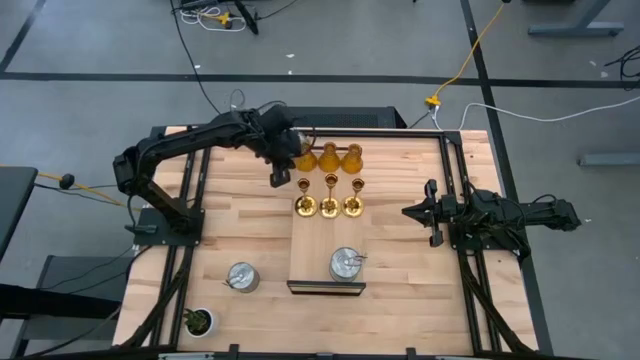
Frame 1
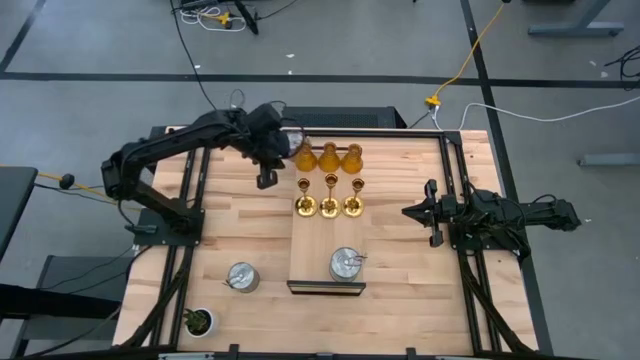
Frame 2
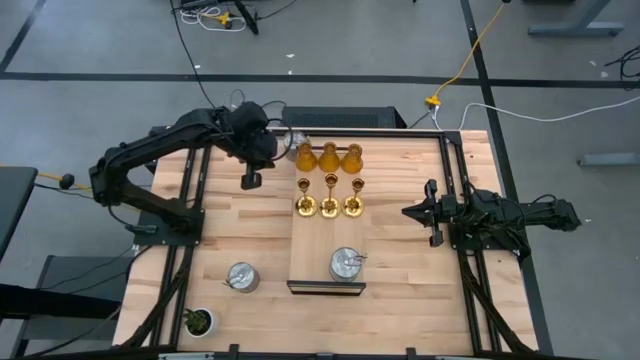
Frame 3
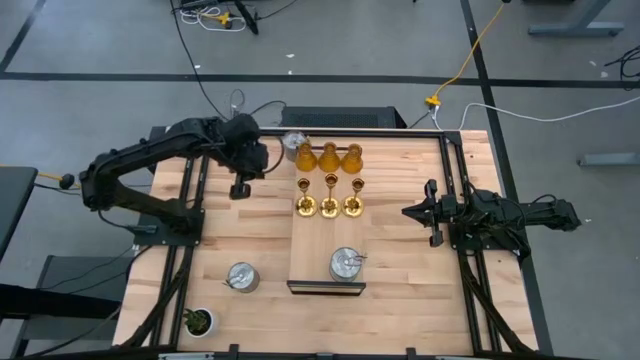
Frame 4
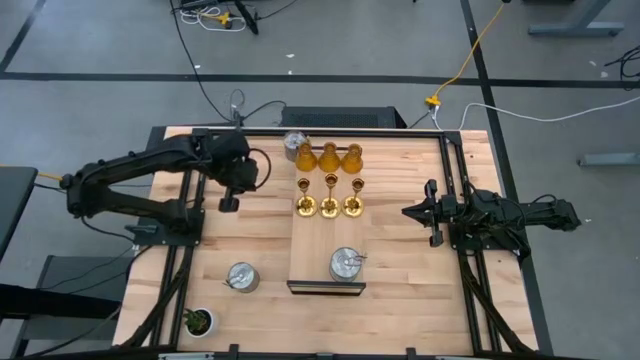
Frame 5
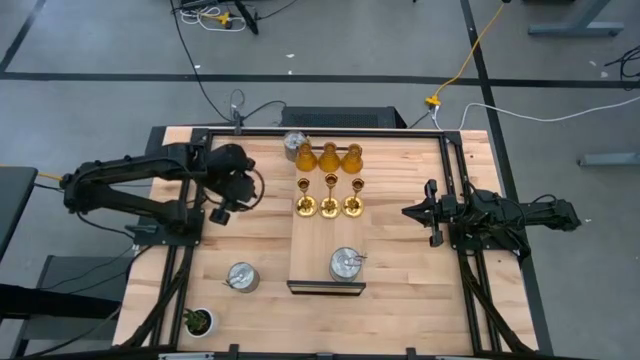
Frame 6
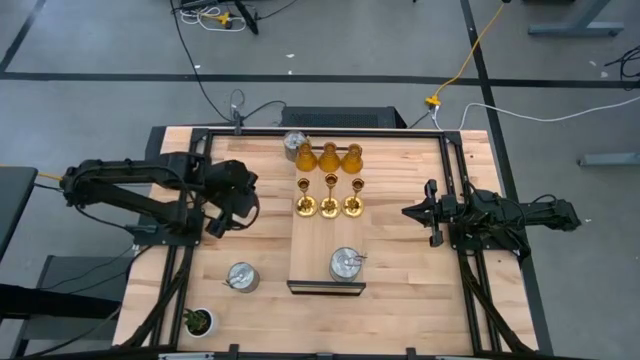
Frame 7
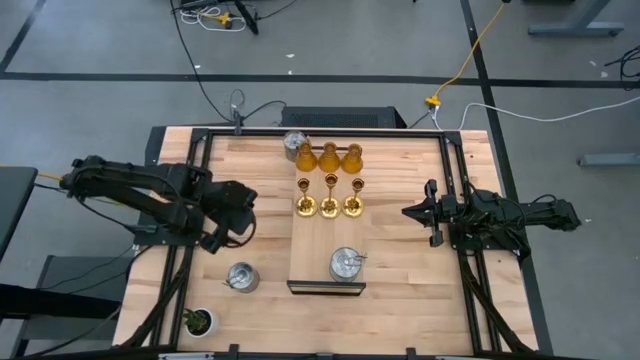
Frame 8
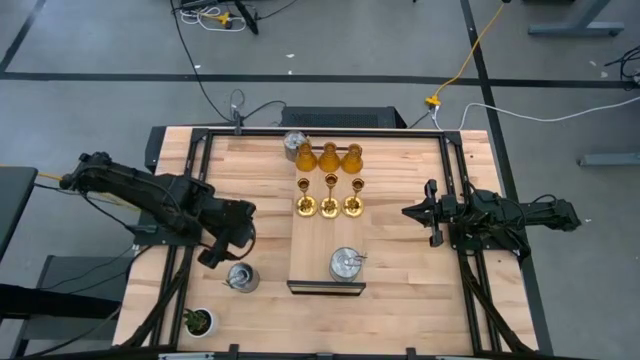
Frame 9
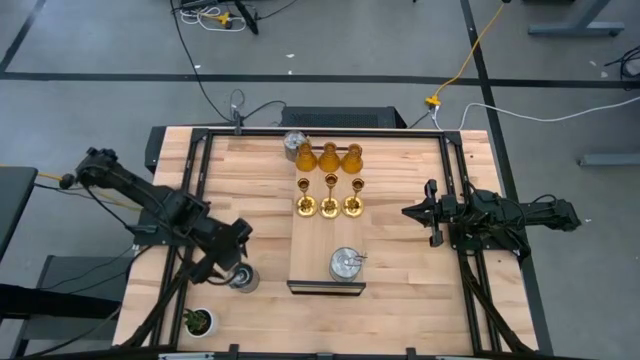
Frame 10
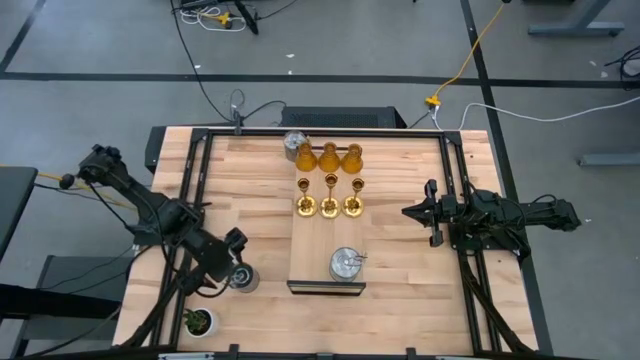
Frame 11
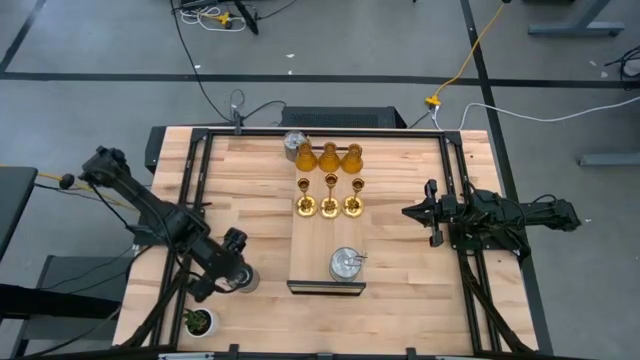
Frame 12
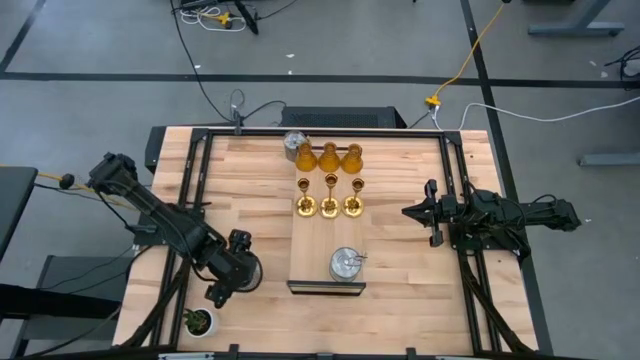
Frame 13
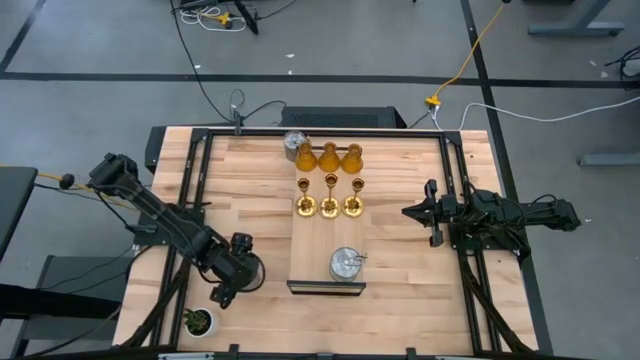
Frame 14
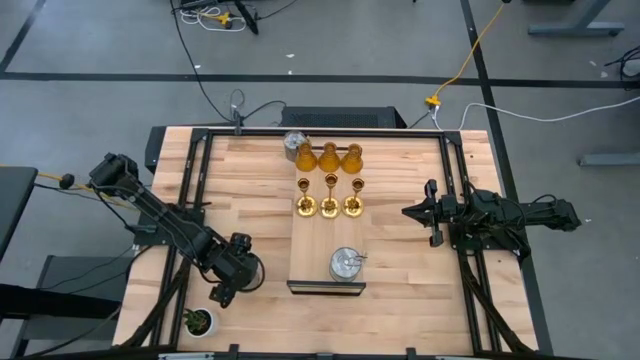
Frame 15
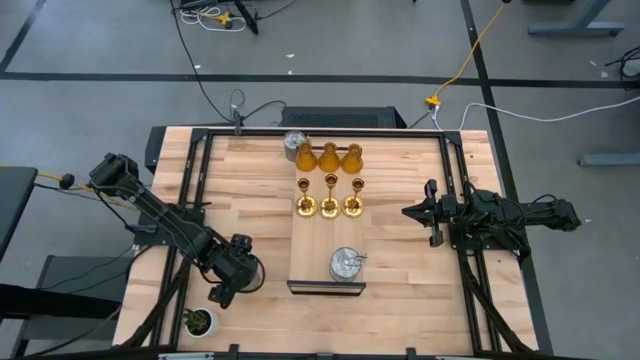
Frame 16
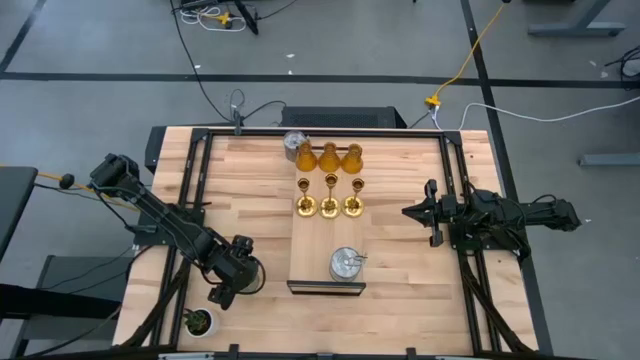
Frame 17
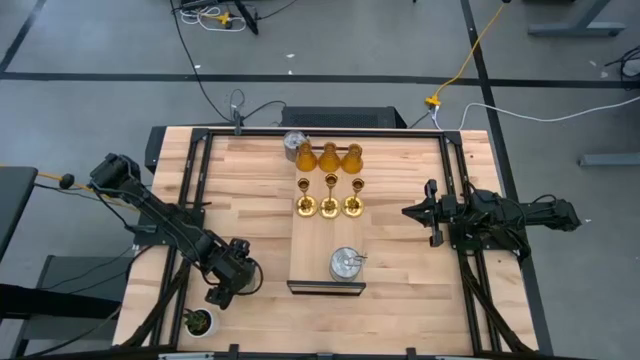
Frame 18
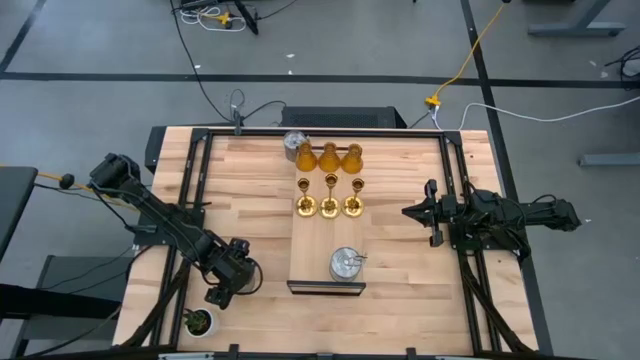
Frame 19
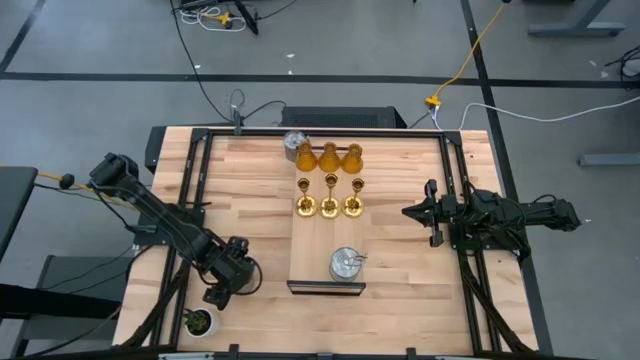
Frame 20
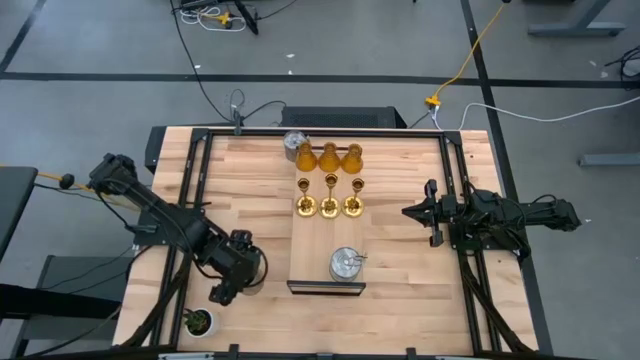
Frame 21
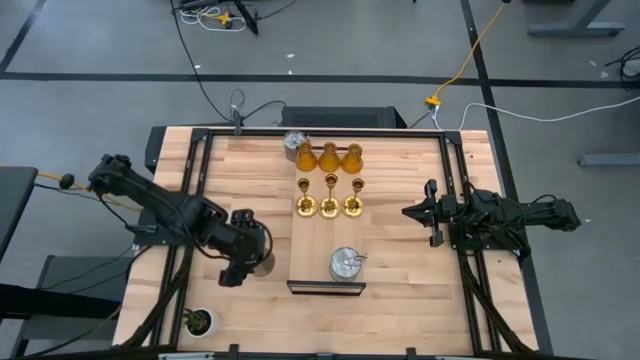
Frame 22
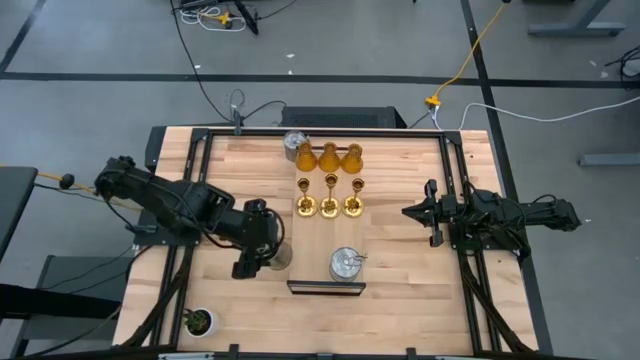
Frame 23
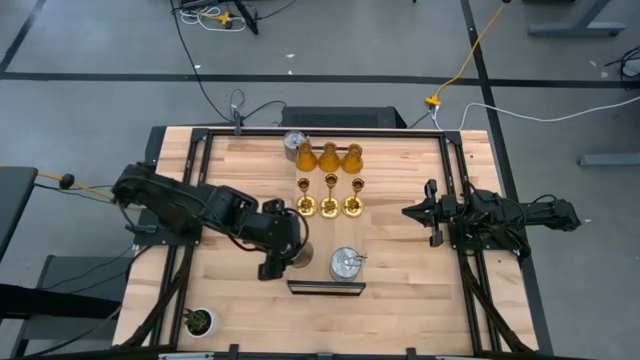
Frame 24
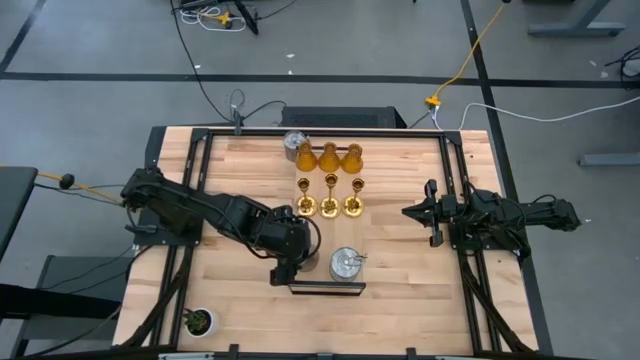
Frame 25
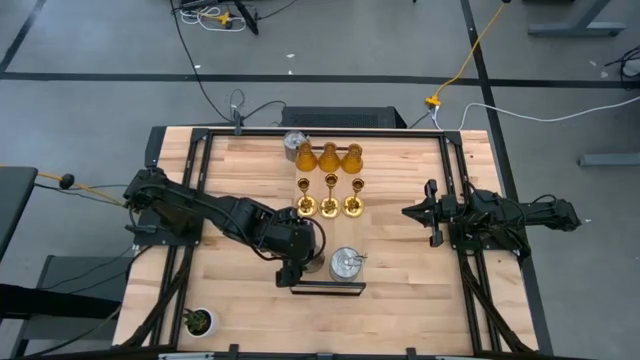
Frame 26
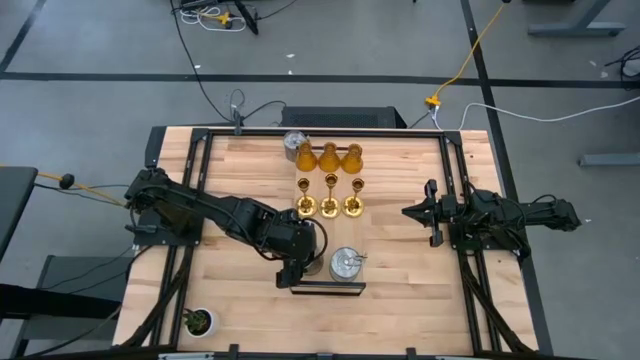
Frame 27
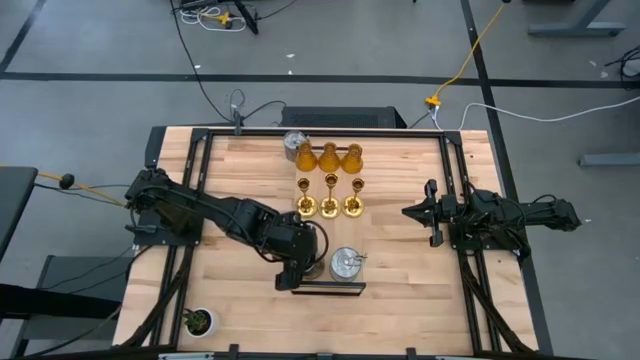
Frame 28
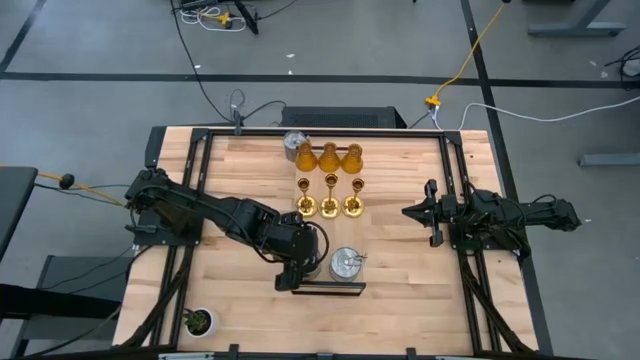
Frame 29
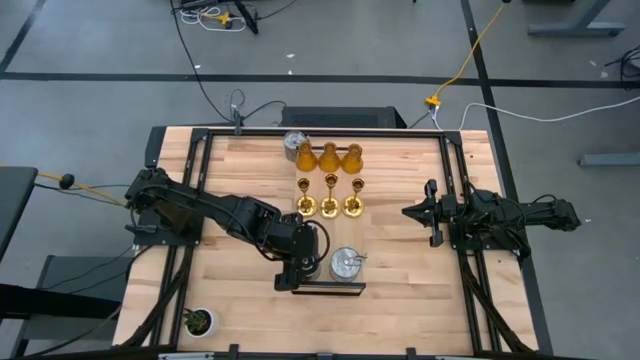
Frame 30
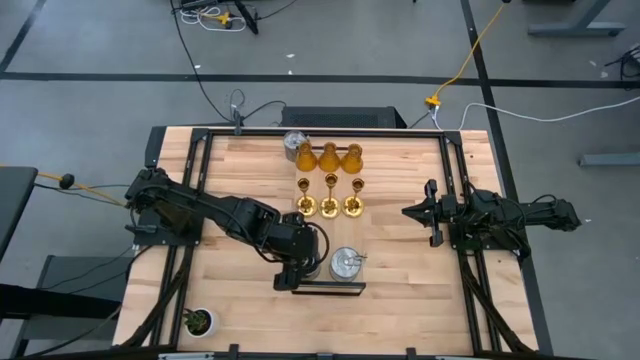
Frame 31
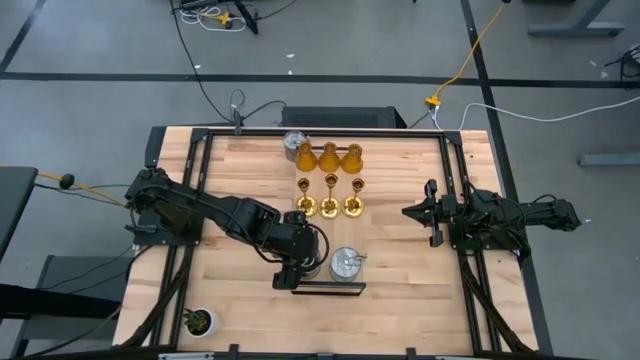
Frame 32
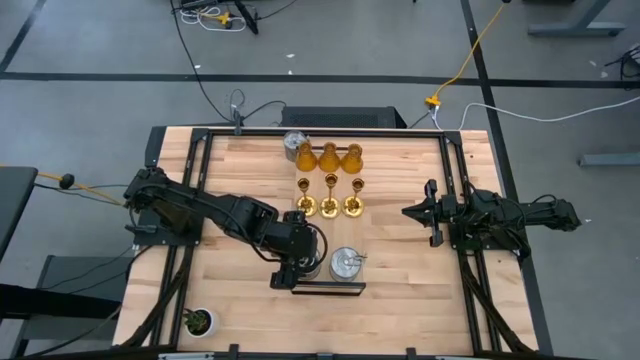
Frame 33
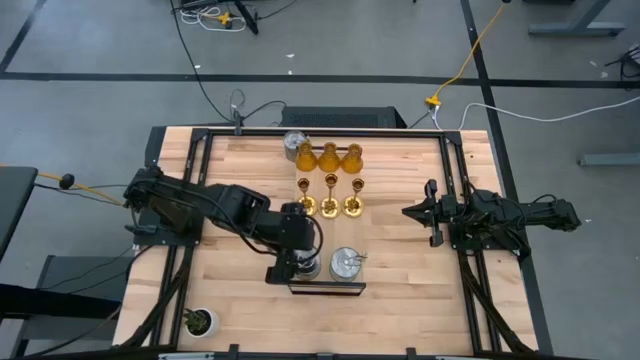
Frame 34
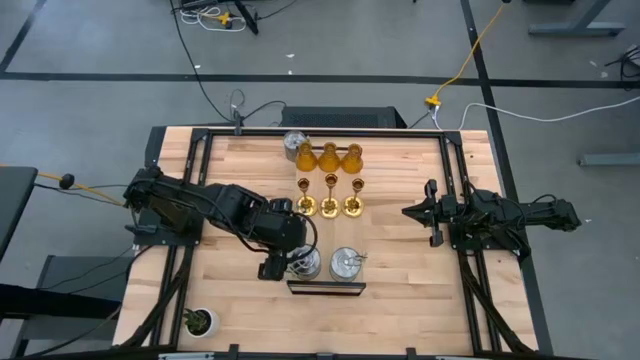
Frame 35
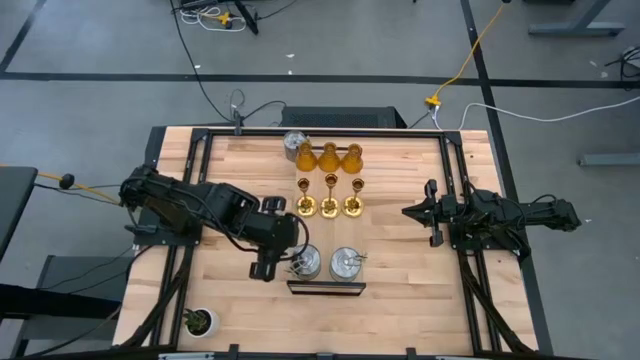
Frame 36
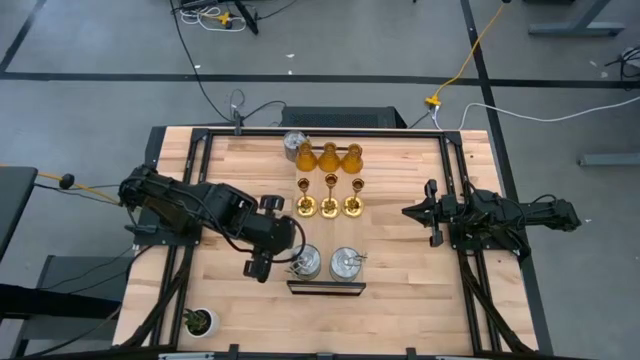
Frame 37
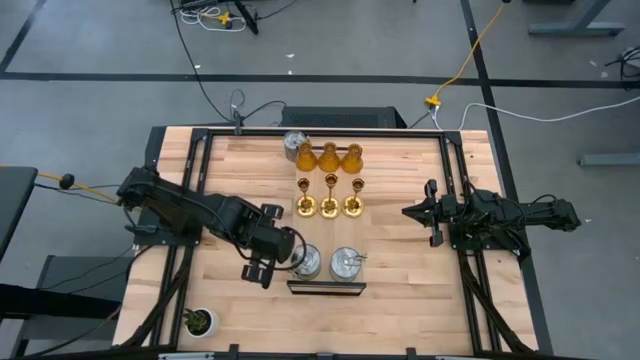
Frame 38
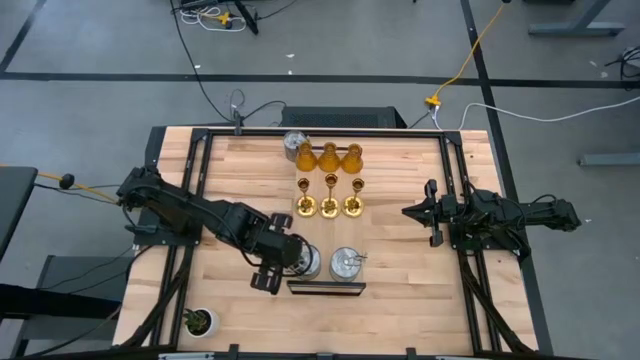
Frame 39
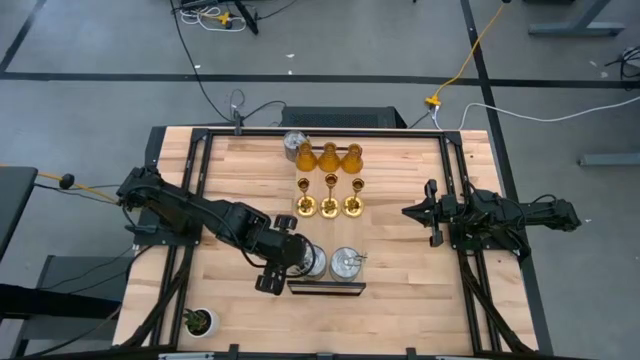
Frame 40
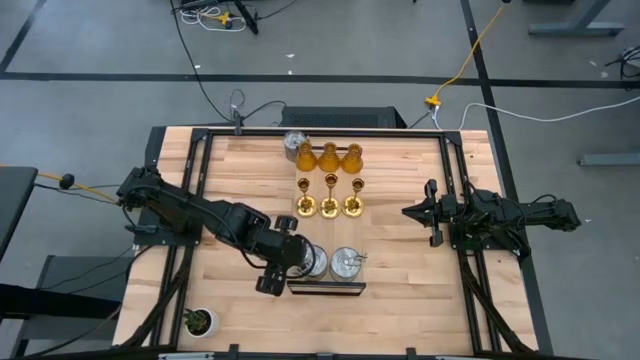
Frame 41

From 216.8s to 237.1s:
Task: Pick & Place candle stick holders
Put the bottom scented candle on the shelf aligned with the other scented candle
